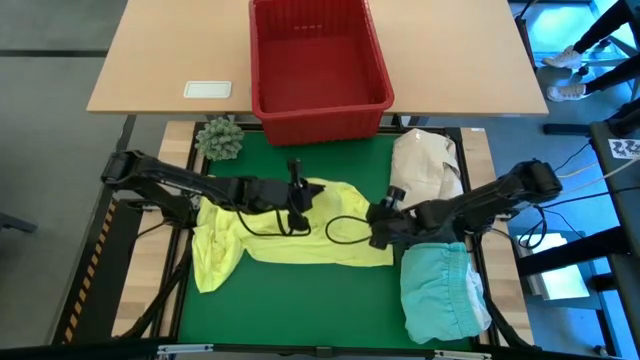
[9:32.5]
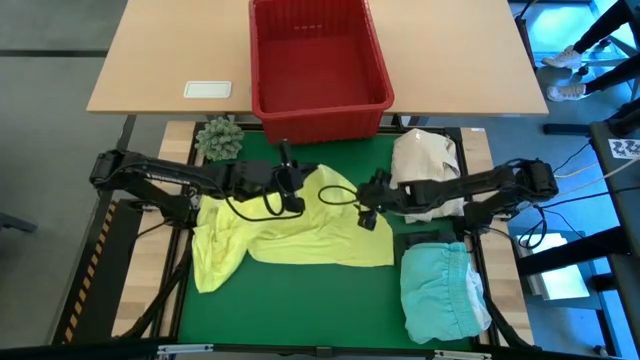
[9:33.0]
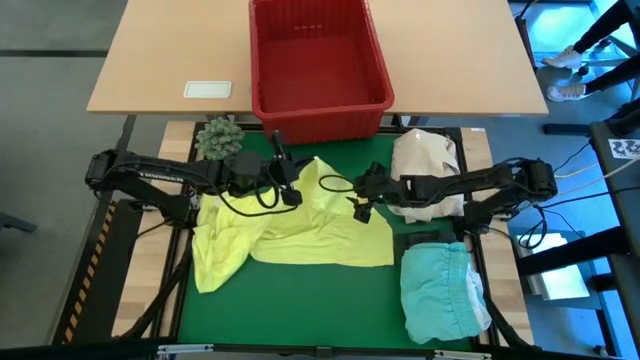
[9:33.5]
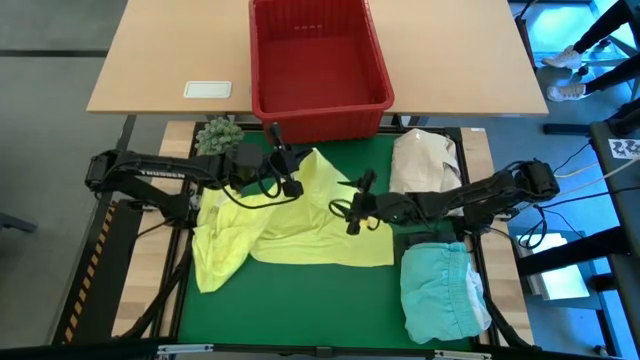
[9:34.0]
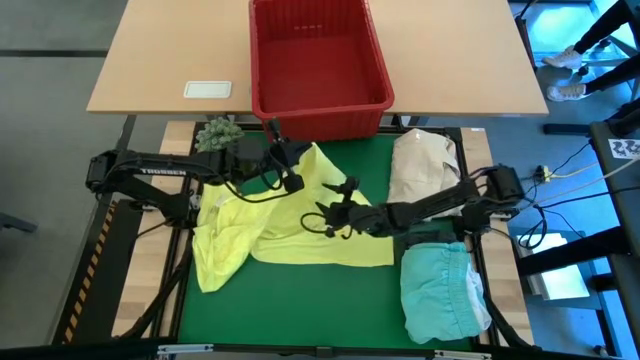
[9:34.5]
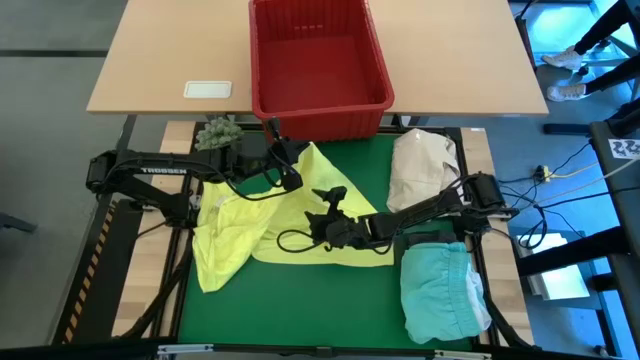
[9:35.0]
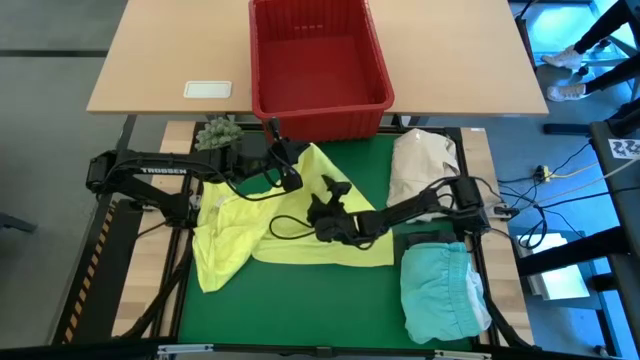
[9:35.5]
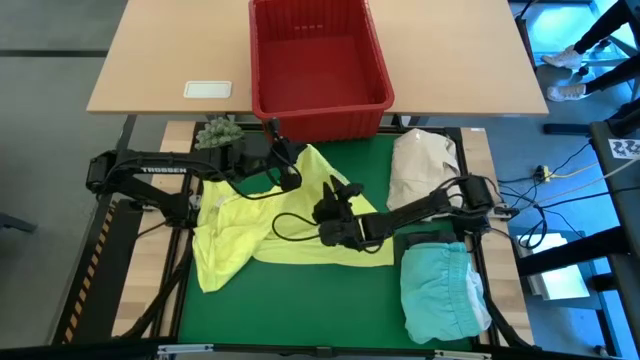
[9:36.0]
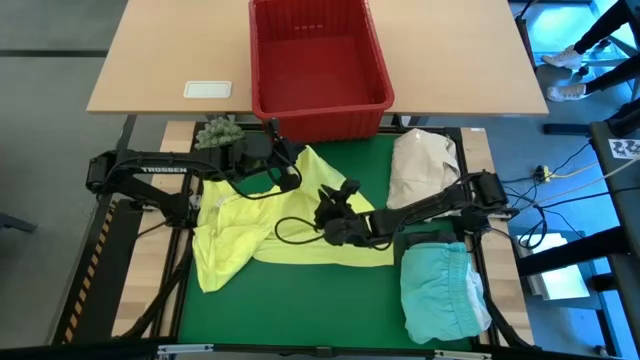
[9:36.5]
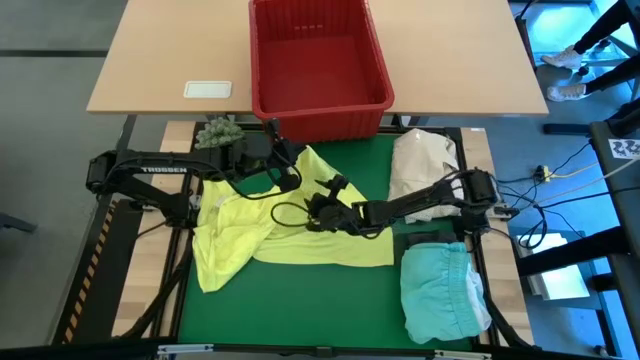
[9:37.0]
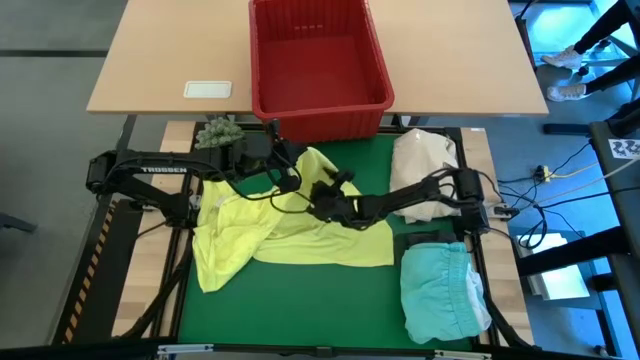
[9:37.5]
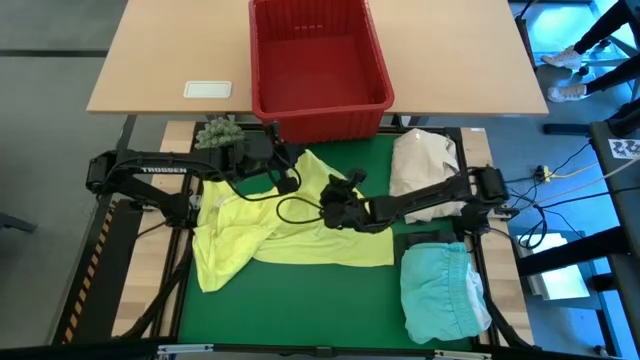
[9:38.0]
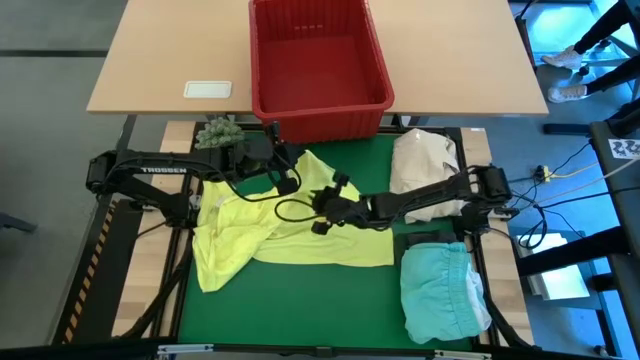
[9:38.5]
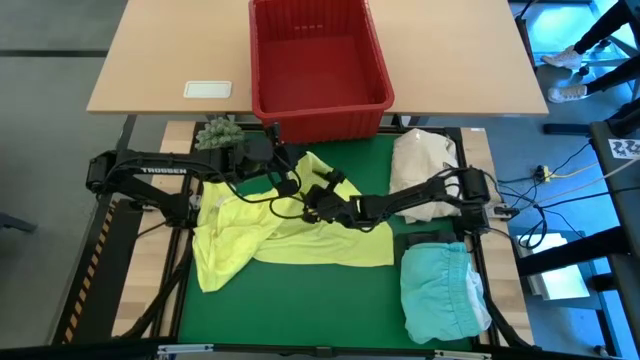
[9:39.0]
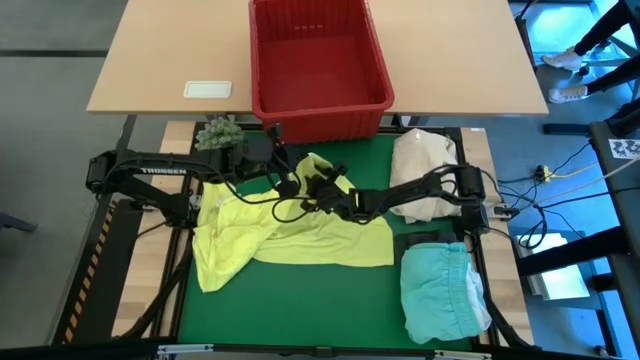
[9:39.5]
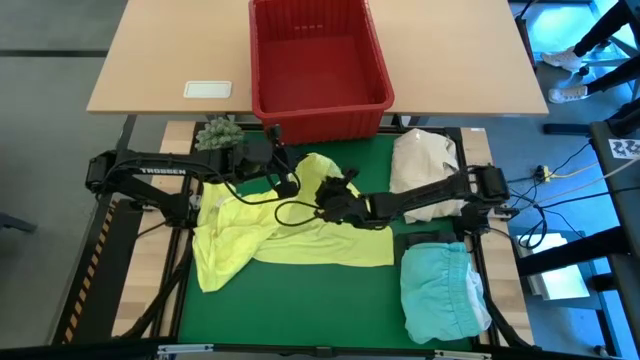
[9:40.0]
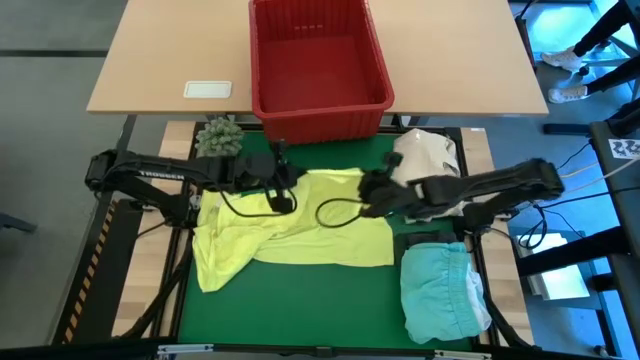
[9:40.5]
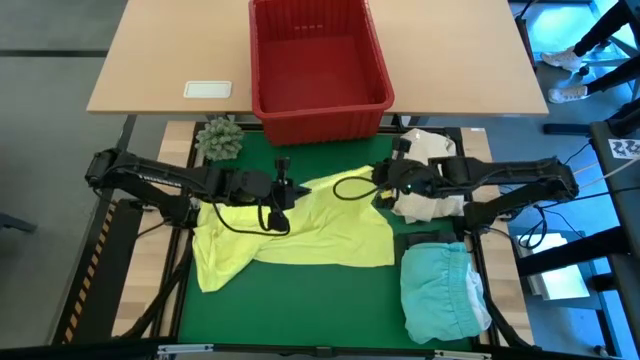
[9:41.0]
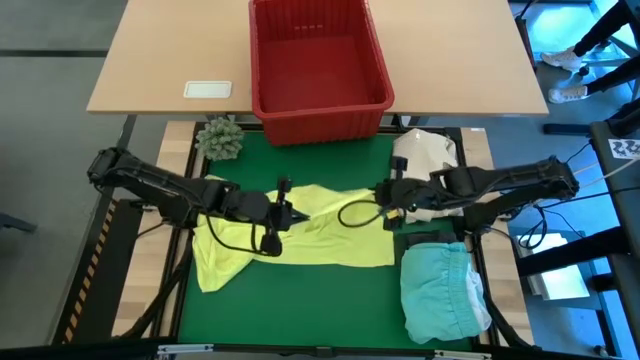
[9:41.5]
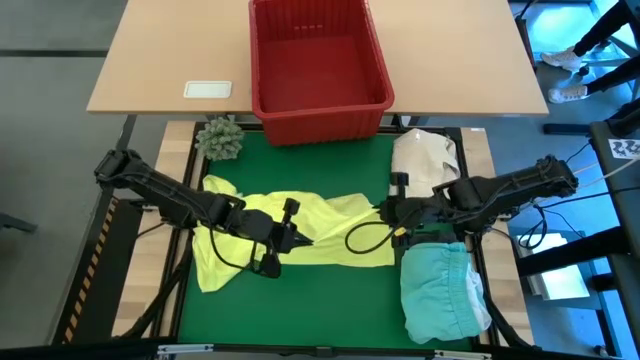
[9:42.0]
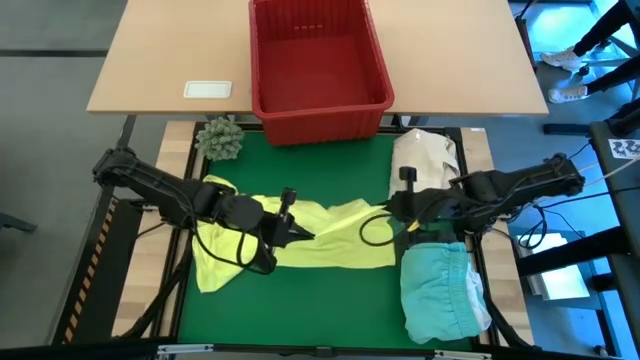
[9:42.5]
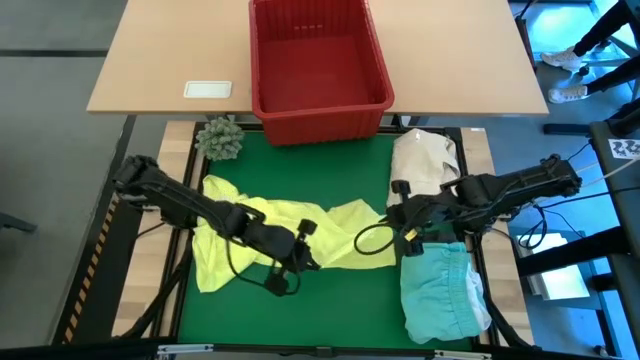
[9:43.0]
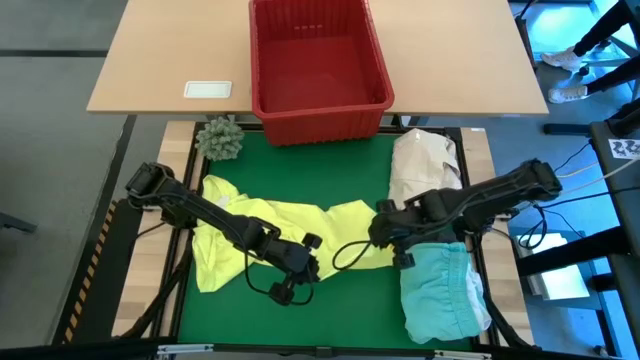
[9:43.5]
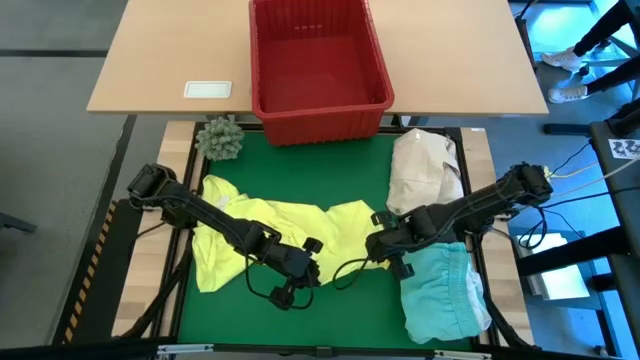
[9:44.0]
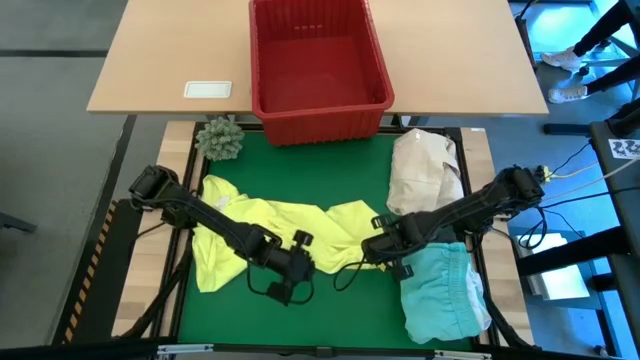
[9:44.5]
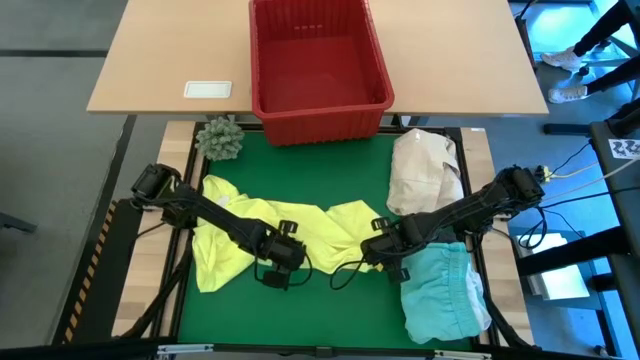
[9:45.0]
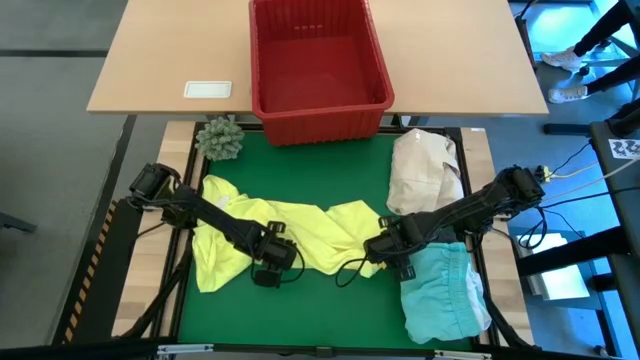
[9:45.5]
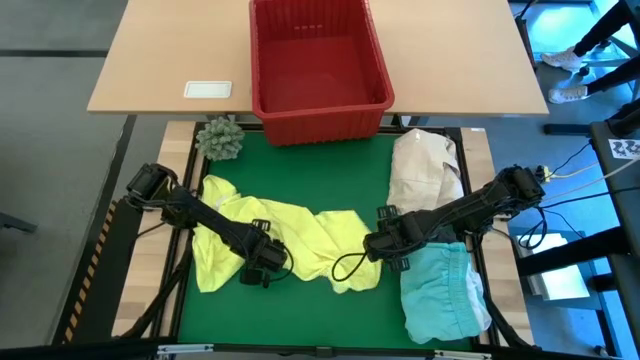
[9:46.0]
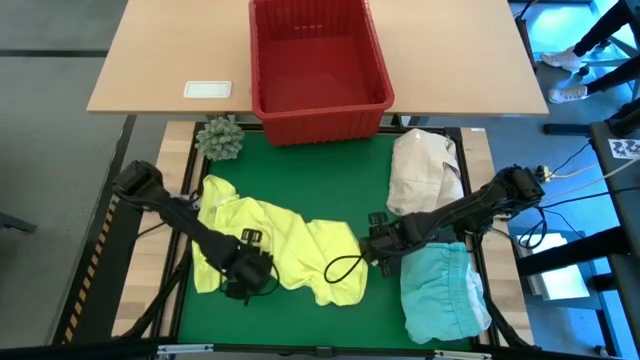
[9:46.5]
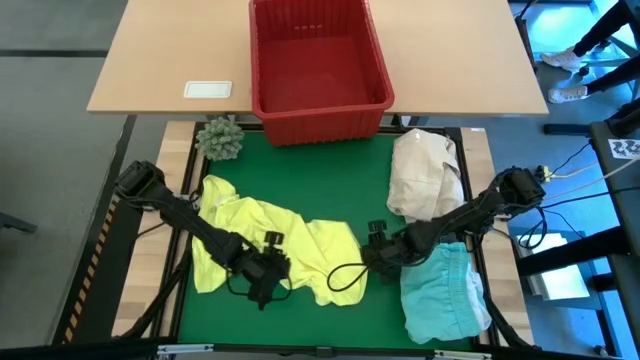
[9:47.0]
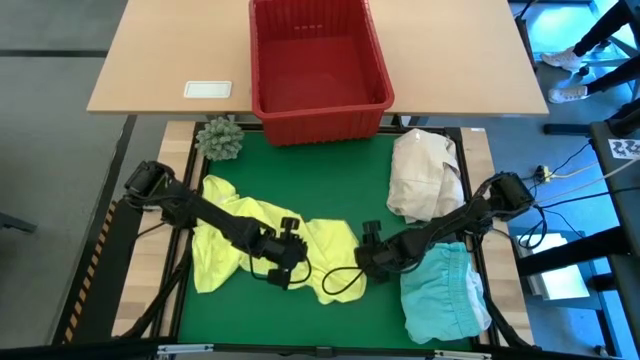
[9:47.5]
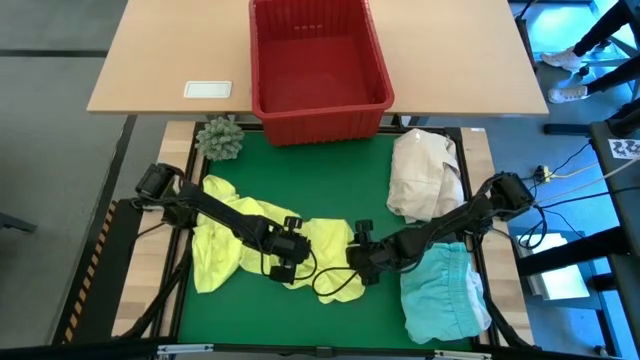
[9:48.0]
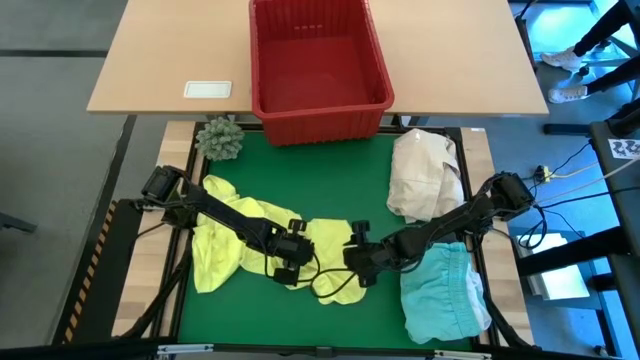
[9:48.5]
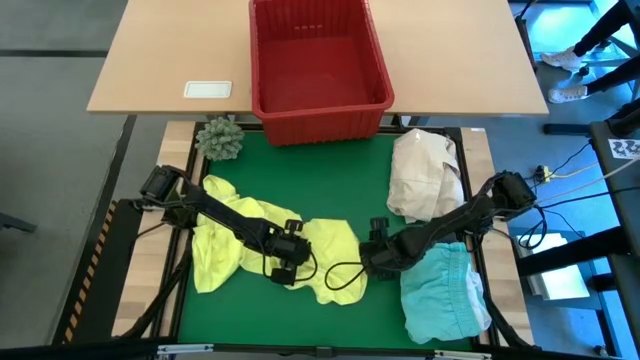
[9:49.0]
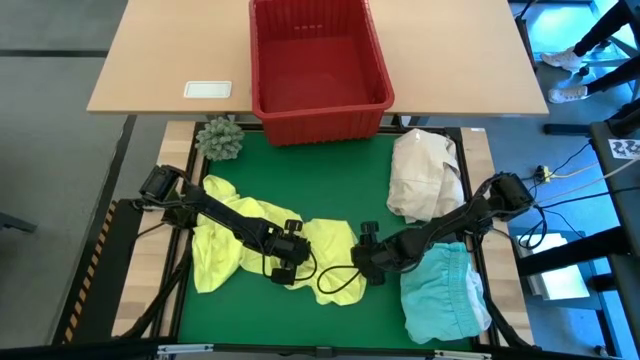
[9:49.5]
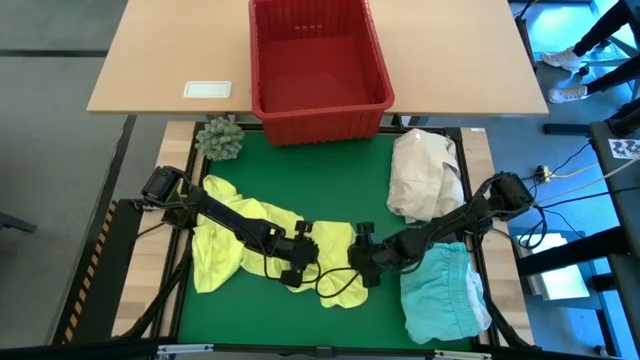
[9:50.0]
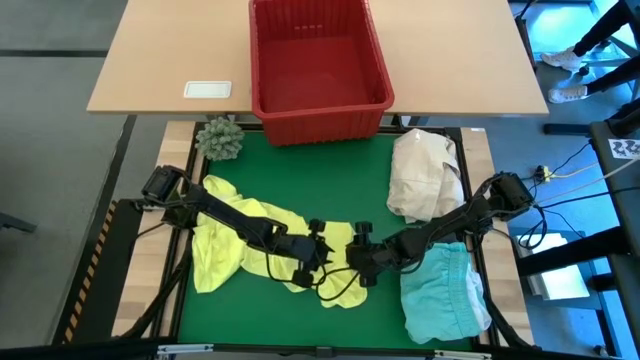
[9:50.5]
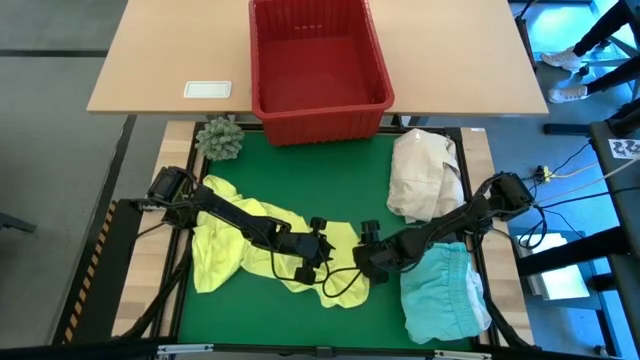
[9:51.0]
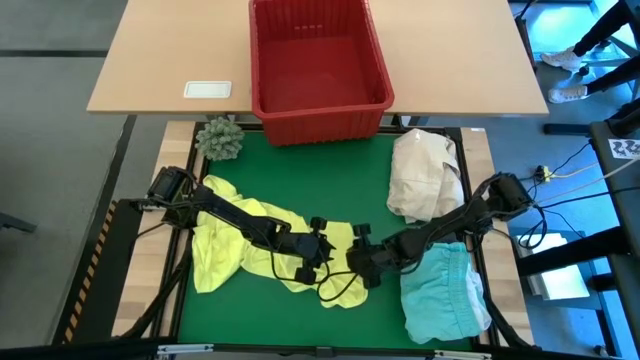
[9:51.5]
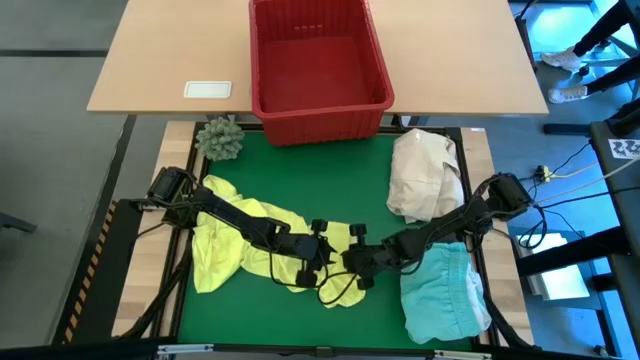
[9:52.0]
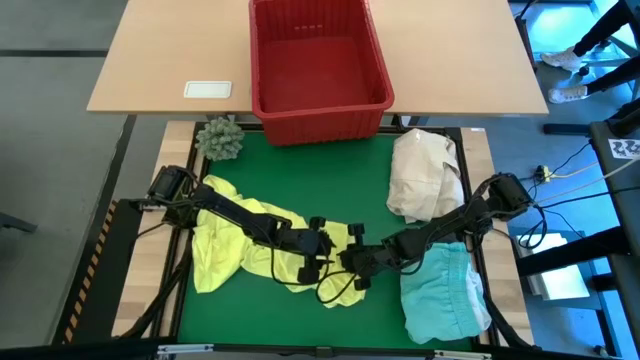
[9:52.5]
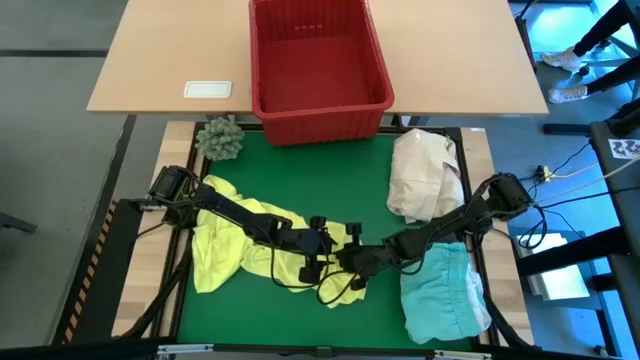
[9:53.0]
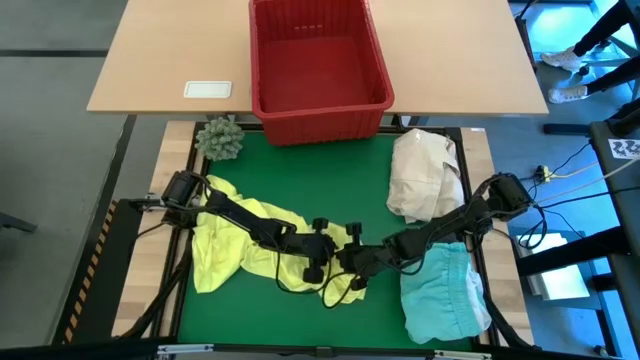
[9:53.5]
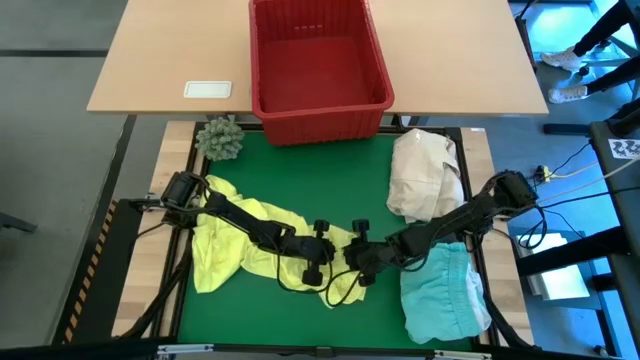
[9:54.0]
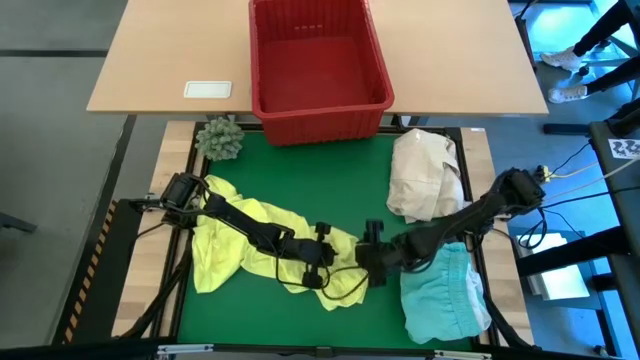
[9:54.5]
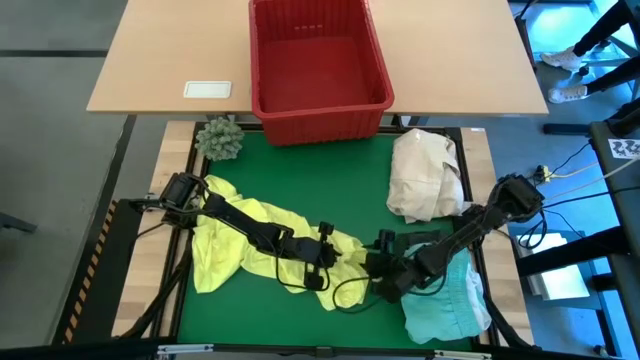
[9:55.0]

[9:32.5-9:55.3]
Task: Fold Laundry from Bin
Fold the yellow shirt
